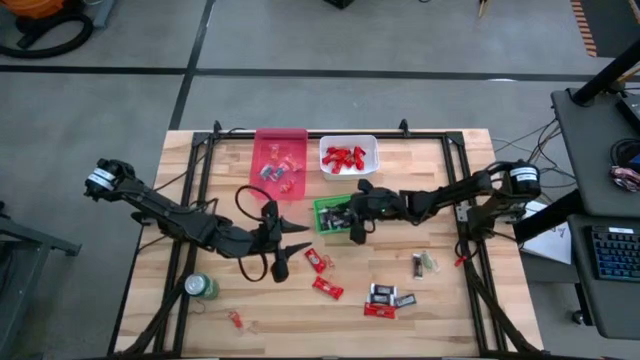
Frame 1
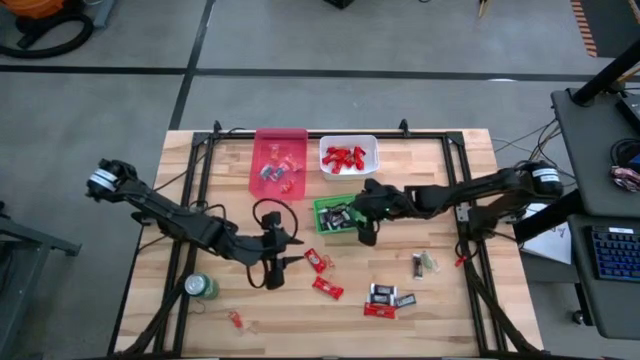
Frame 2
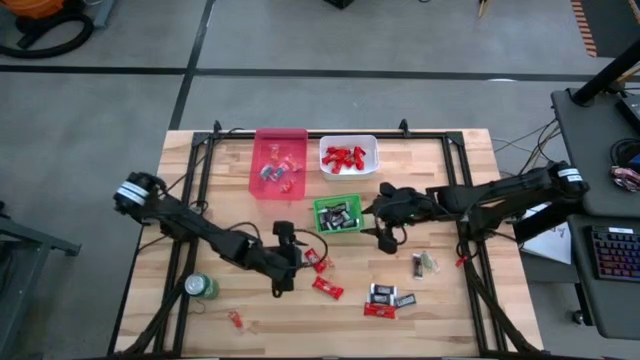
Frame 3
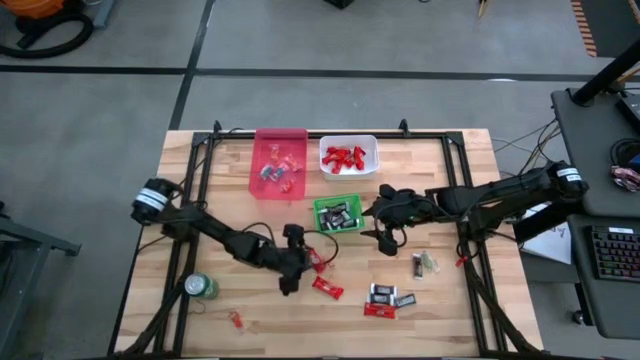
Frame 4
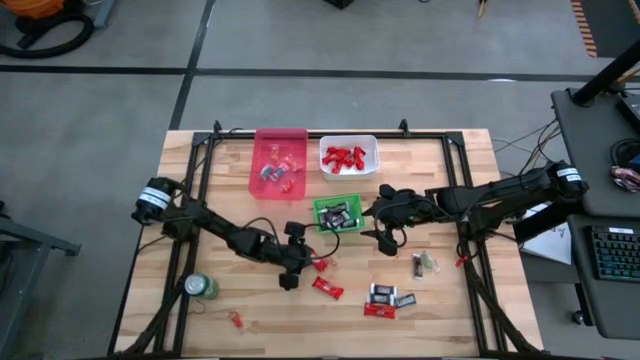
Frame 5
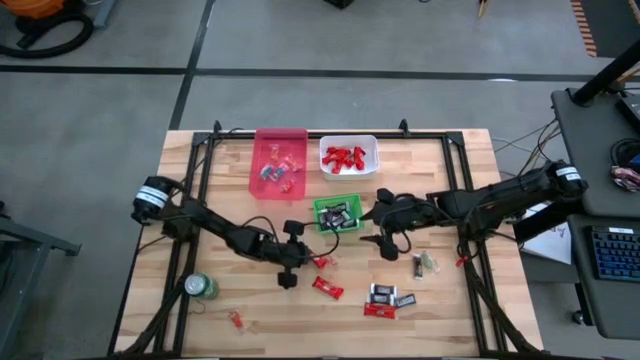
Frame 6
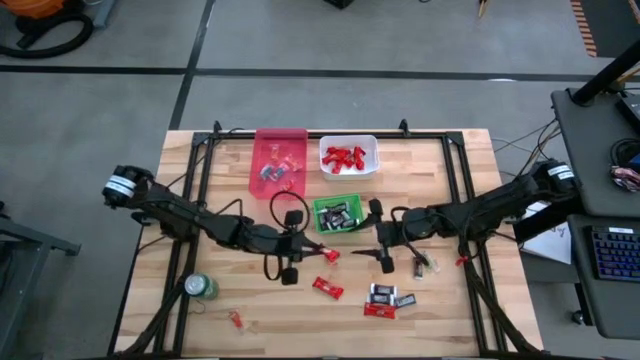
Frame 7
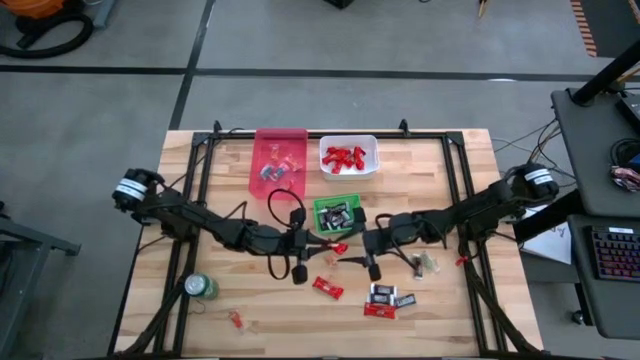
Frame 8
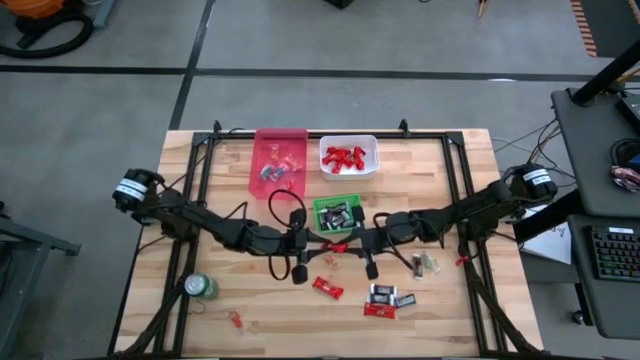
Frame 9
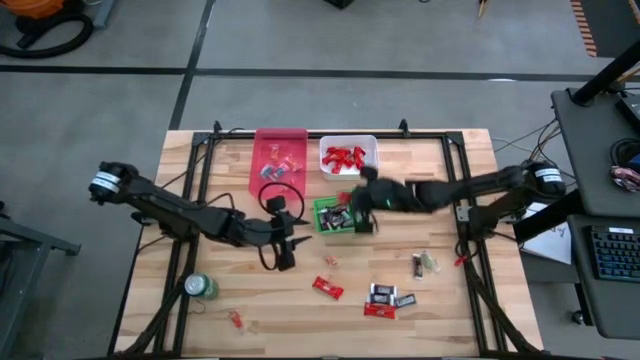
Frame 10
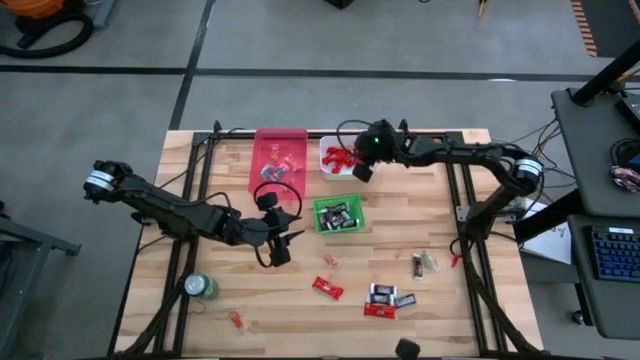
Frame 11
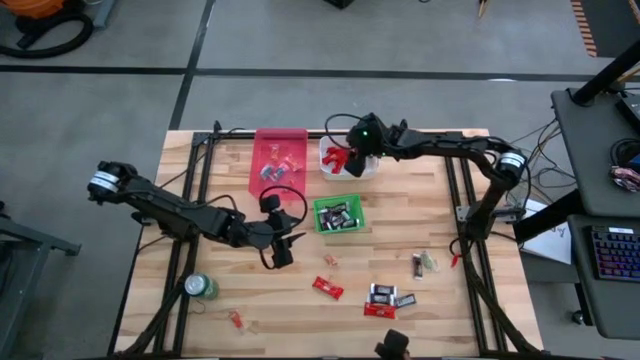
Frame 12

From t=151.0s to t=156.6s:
Task: Sort candy
Put the red chocolate bar into the white bin

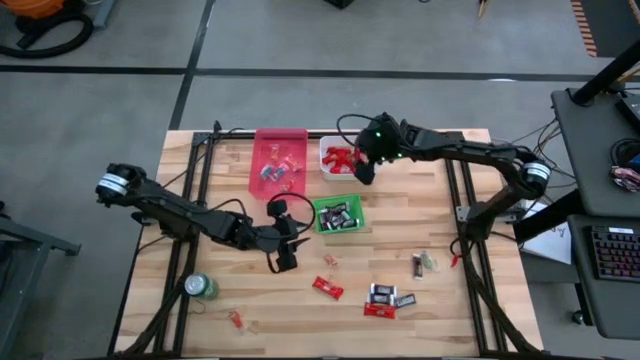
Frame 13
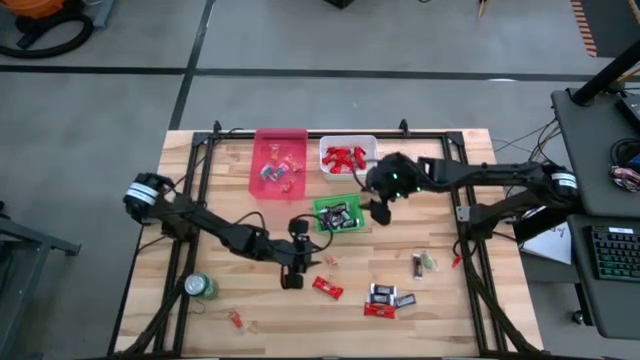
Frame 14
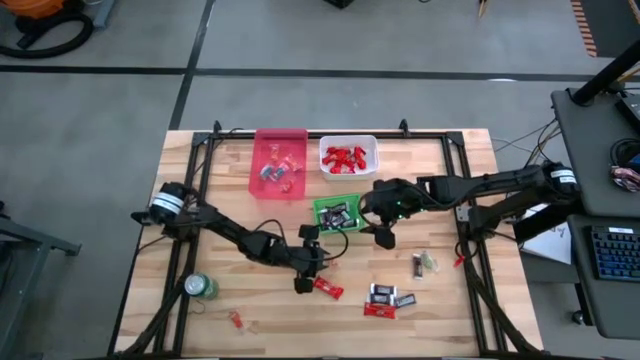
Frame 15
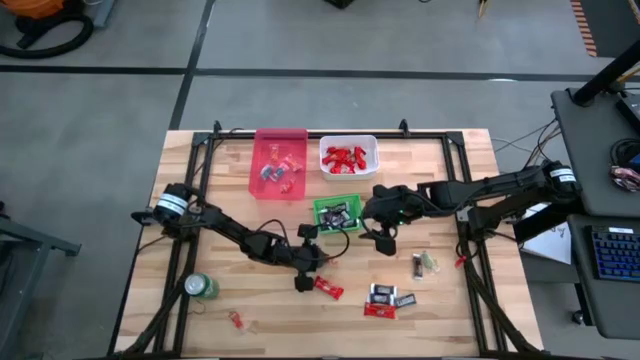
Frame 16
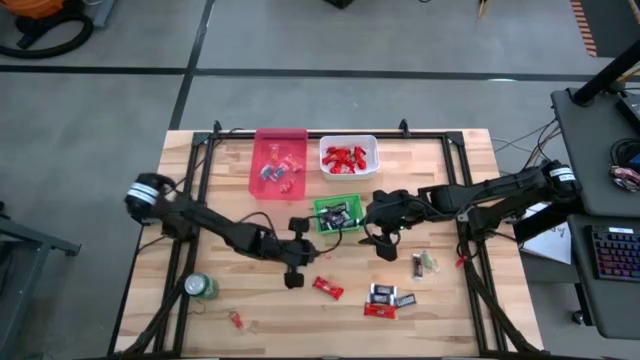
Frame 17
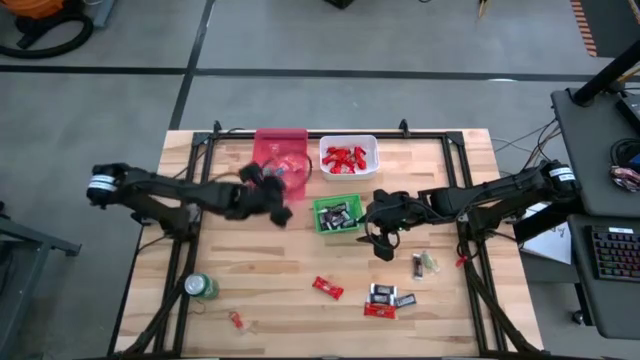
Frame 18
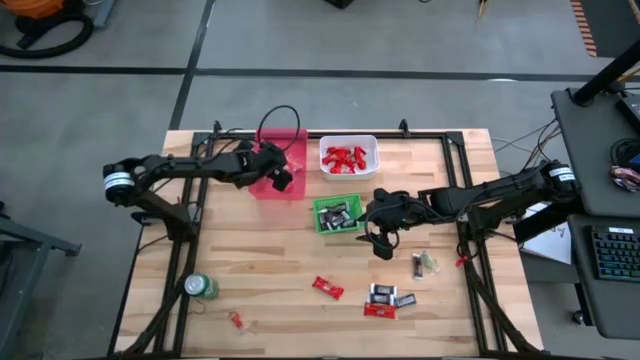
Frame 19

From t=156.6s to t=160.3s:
Put the orange candy into the red bin

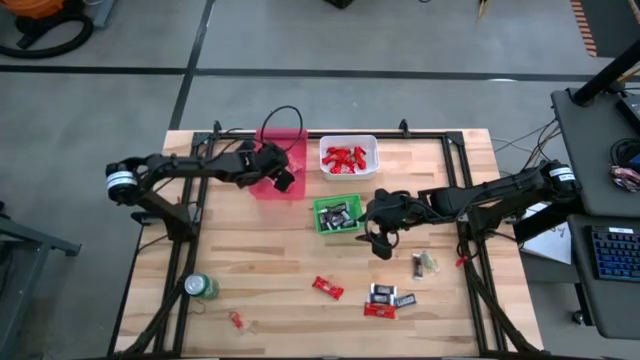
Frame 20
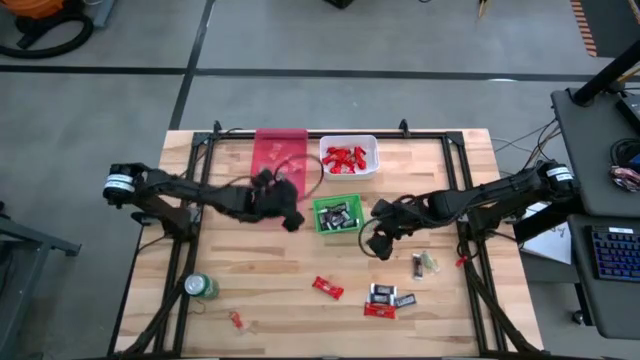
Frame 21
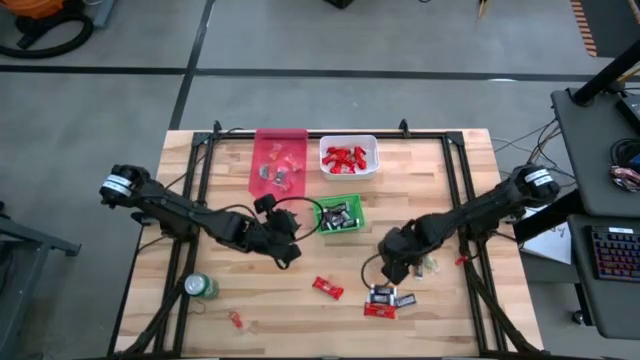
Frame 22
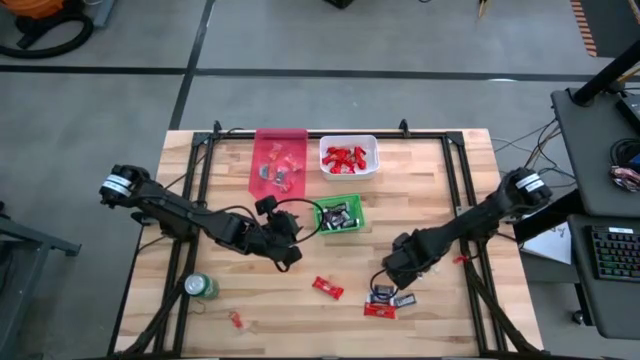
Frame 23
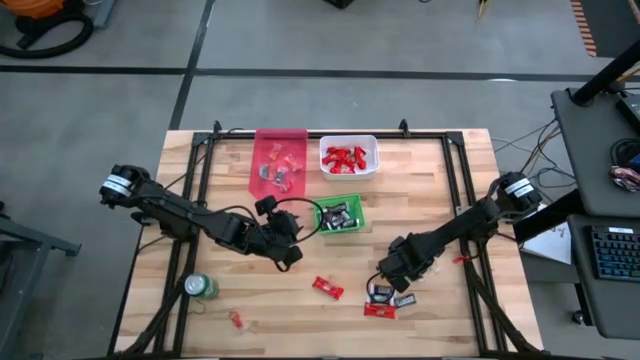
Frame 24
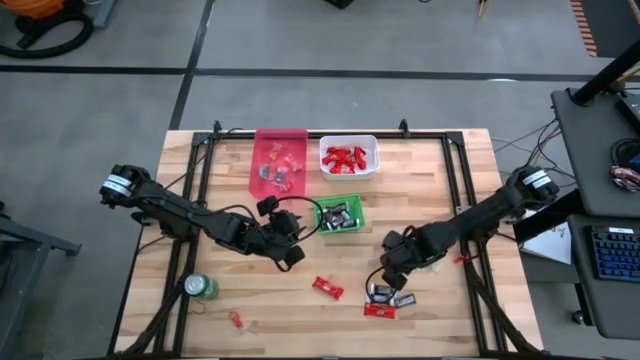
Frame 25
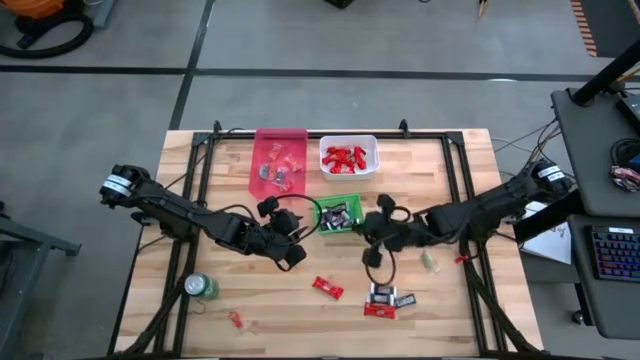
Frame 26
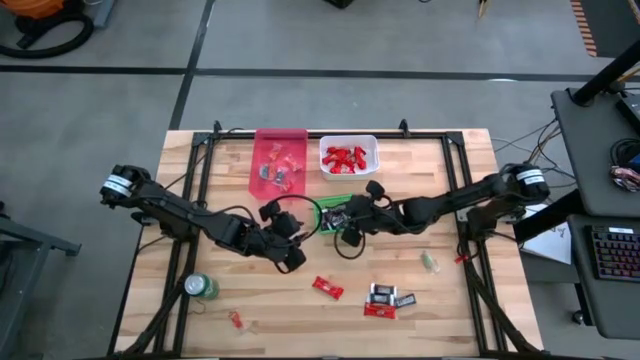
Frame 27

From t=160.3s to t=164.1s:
Put the brown chocolate bar into the green bin

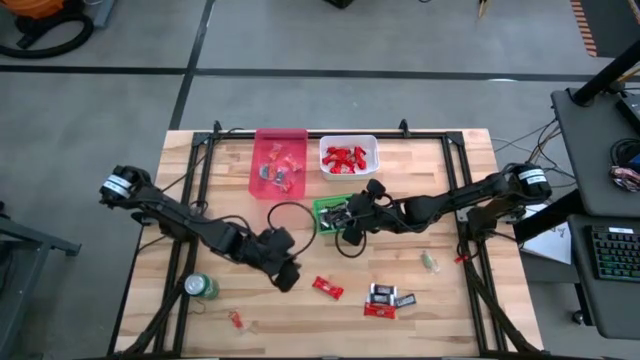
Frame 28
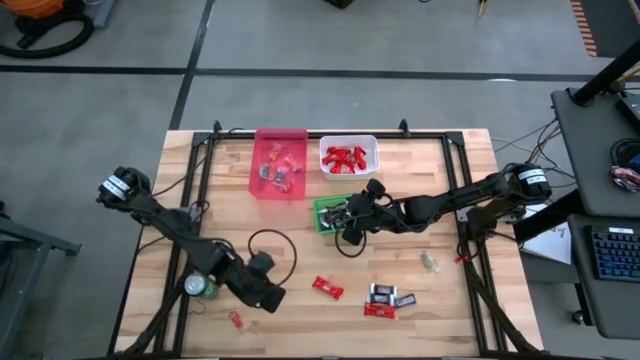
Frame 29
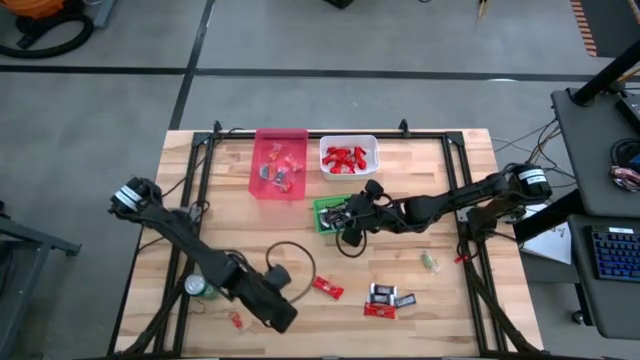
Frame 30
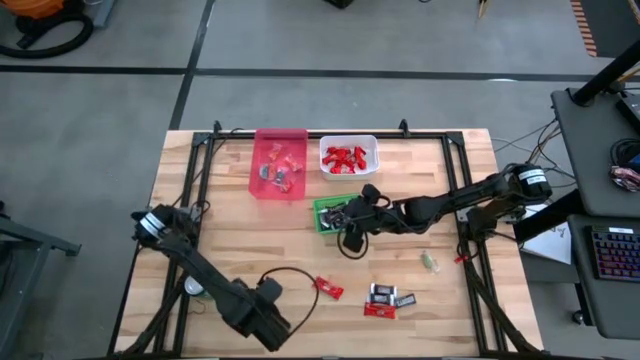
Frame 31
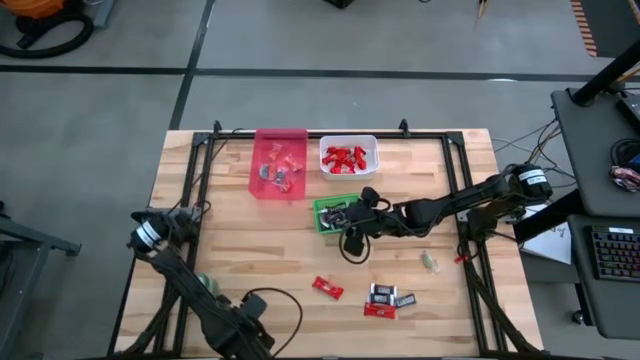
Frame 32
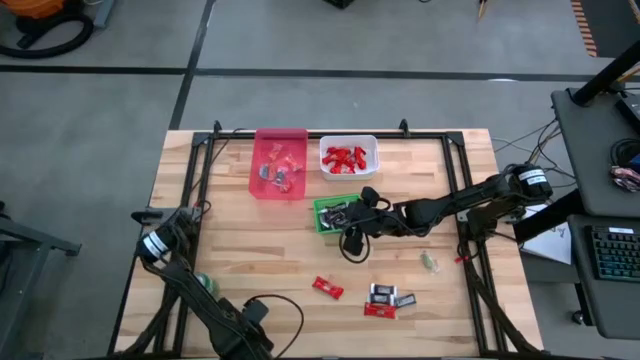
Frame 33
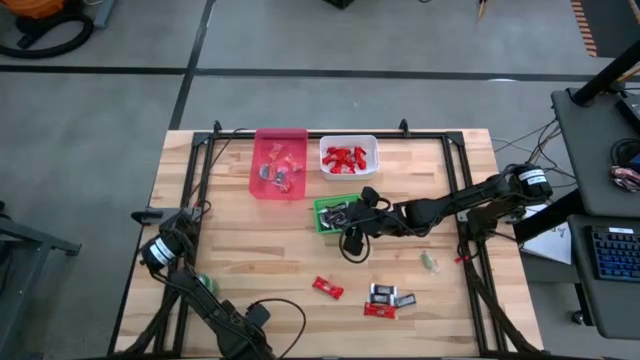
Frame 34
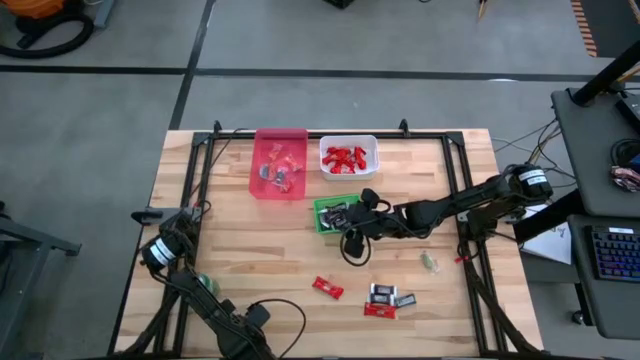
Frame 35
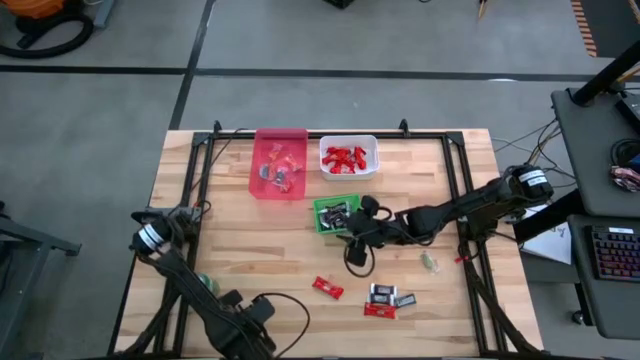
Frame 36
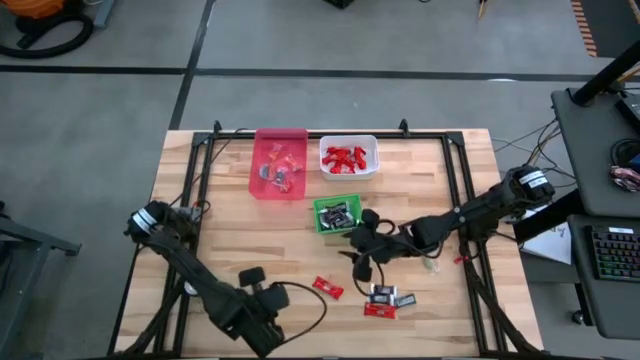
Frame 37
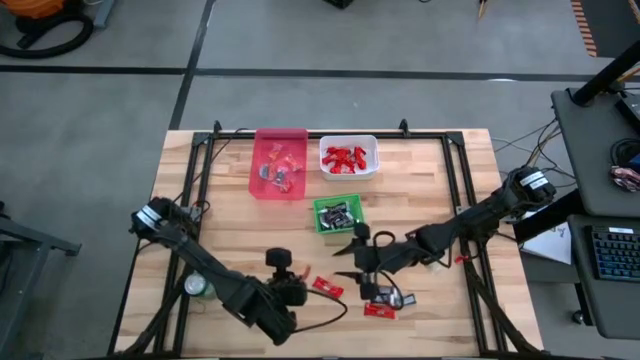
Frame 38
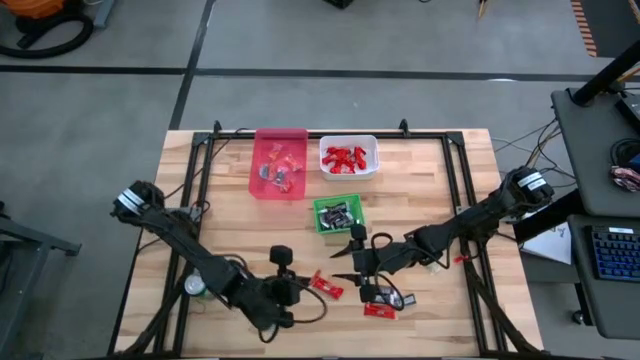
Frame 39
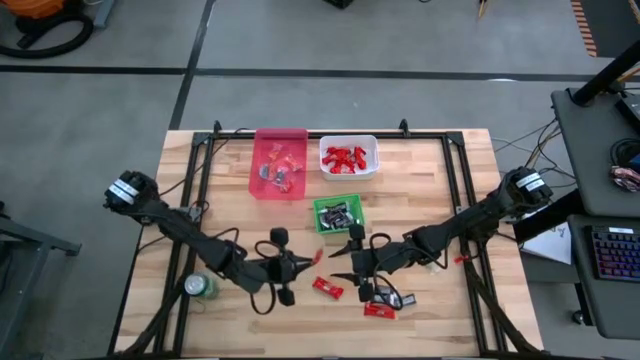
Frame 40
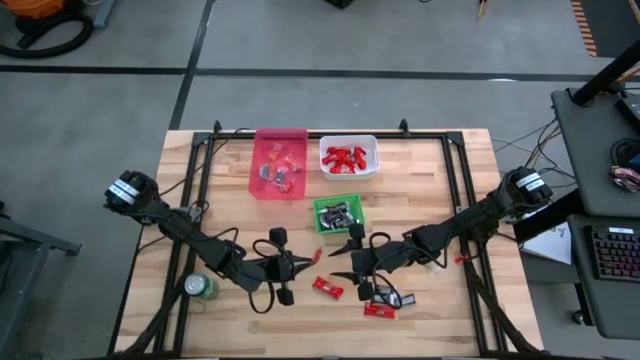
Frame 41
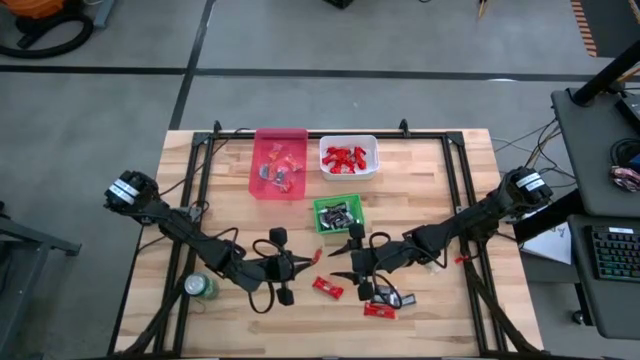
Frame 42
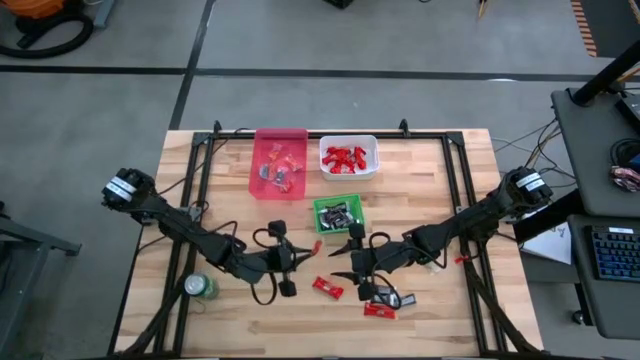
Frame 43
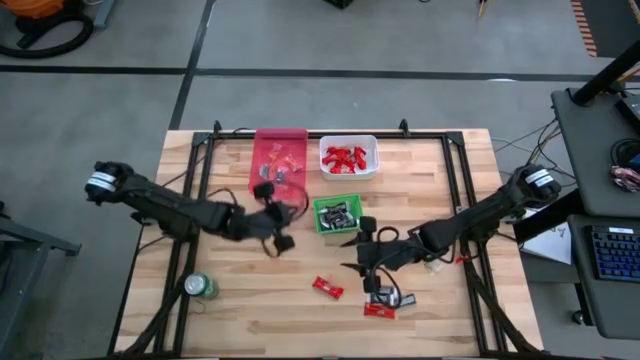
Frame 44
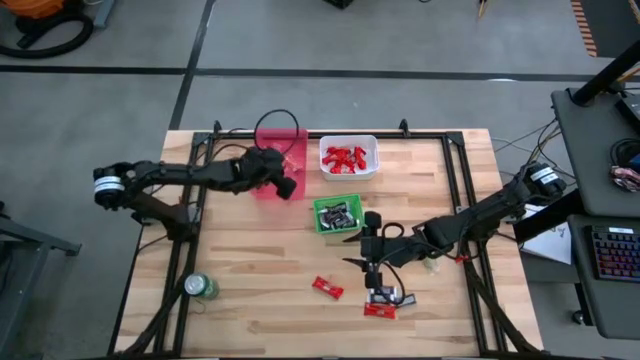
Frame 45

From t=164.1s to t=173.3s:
Put the orange candy r into the red bin
